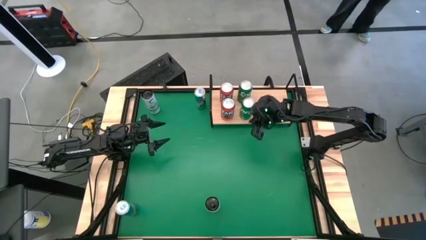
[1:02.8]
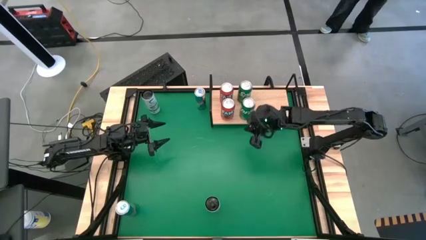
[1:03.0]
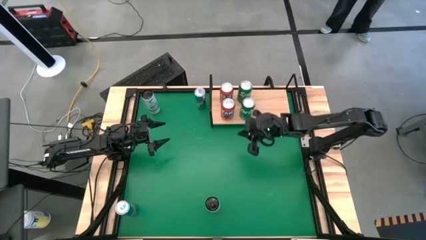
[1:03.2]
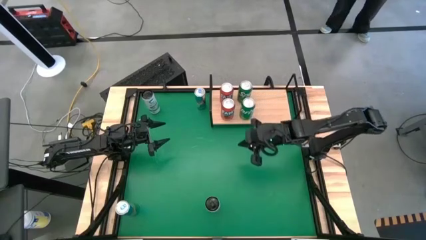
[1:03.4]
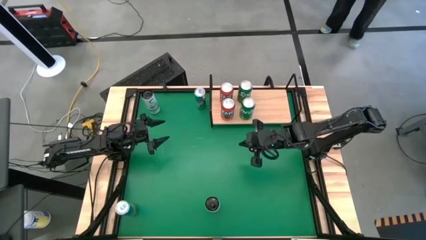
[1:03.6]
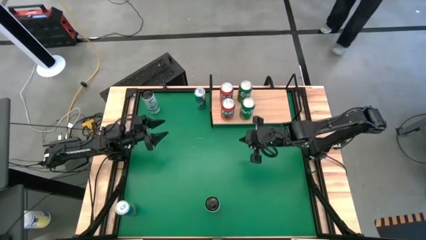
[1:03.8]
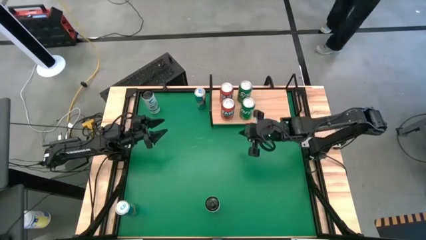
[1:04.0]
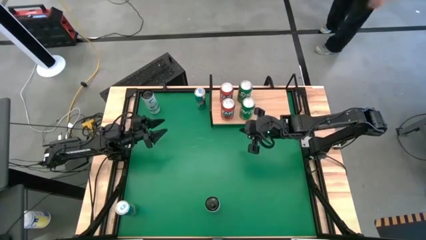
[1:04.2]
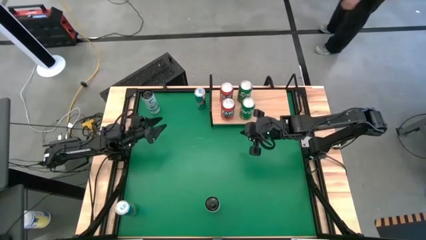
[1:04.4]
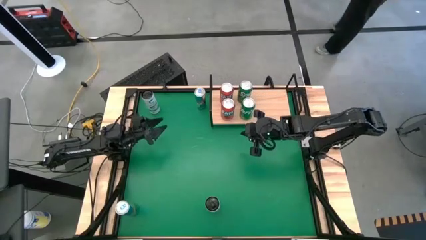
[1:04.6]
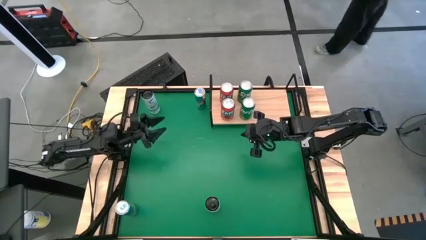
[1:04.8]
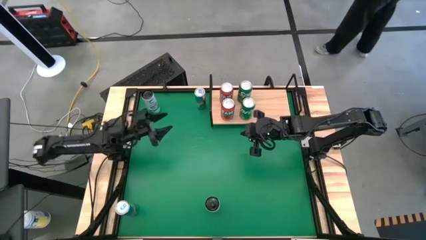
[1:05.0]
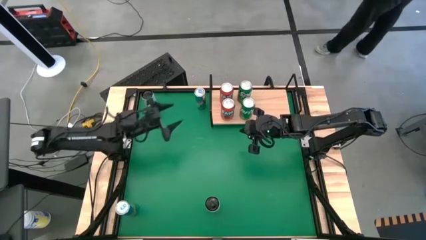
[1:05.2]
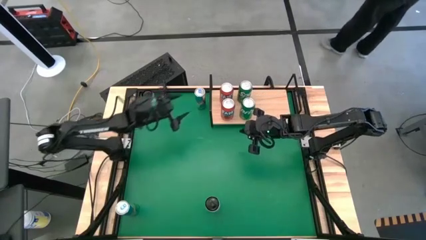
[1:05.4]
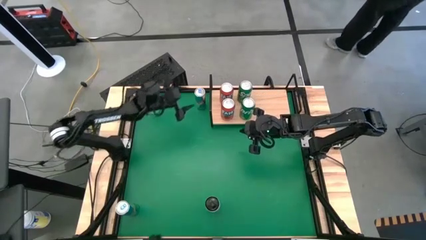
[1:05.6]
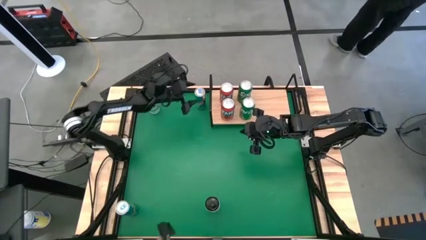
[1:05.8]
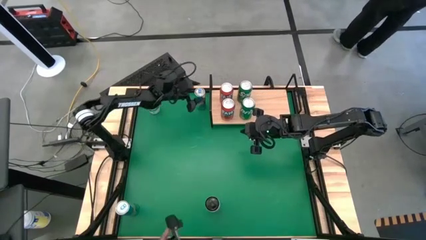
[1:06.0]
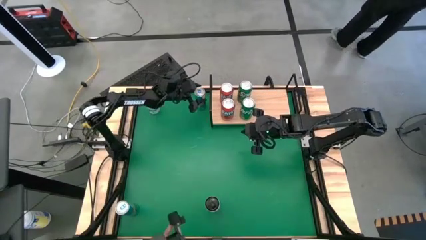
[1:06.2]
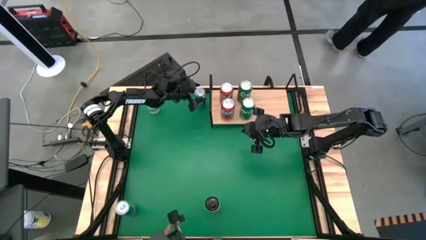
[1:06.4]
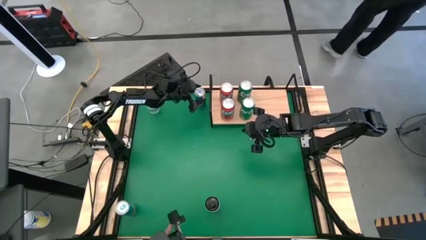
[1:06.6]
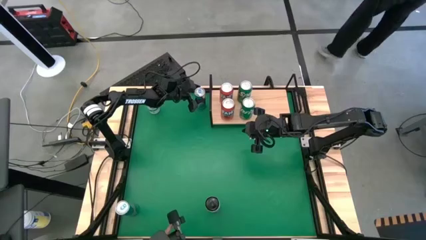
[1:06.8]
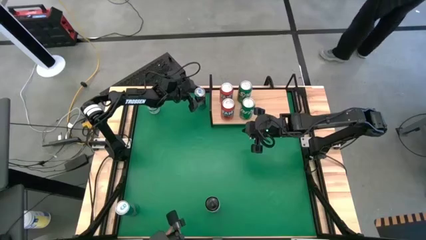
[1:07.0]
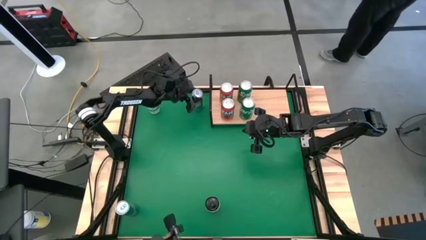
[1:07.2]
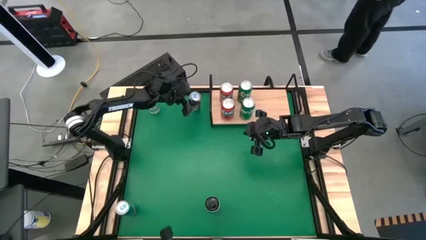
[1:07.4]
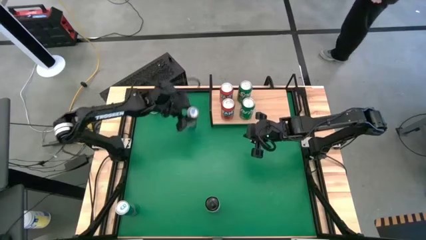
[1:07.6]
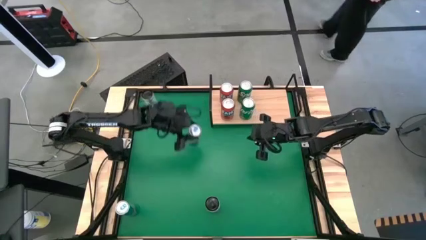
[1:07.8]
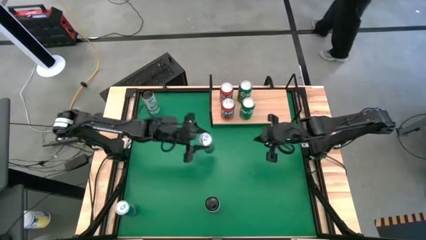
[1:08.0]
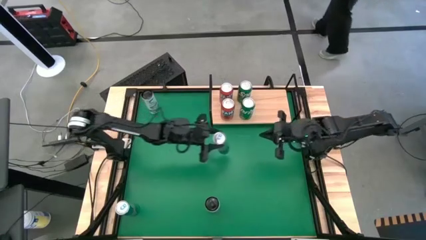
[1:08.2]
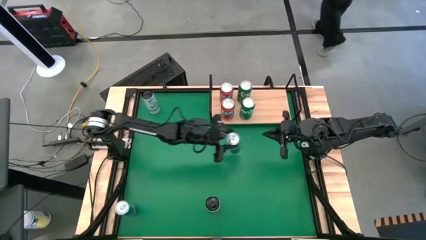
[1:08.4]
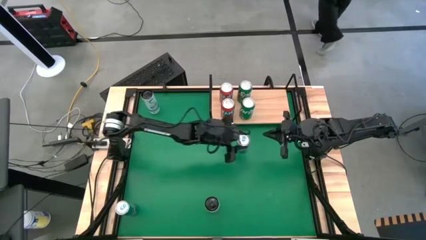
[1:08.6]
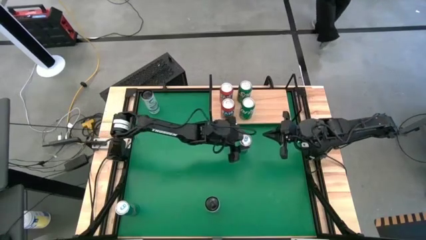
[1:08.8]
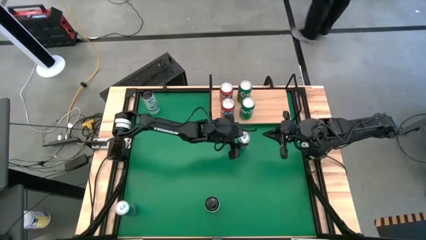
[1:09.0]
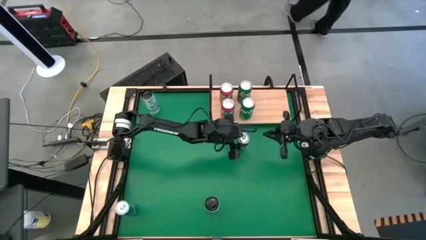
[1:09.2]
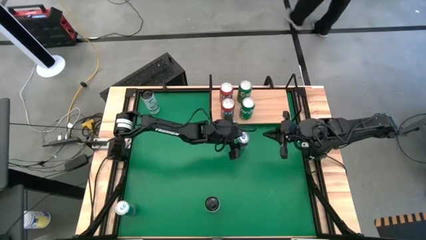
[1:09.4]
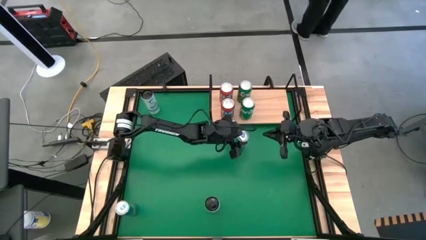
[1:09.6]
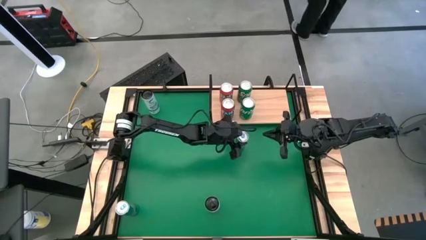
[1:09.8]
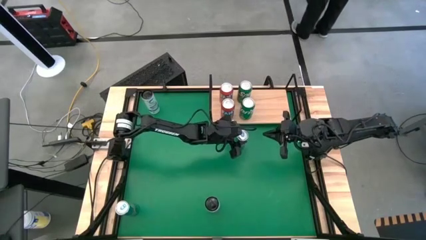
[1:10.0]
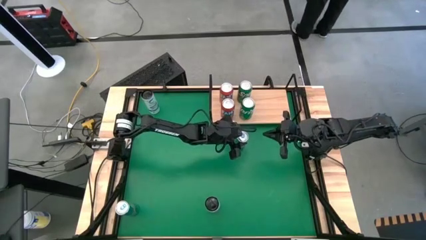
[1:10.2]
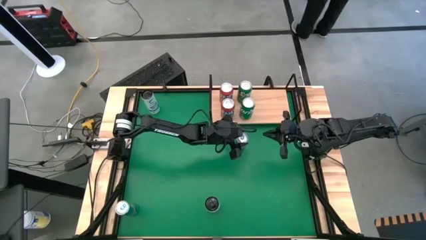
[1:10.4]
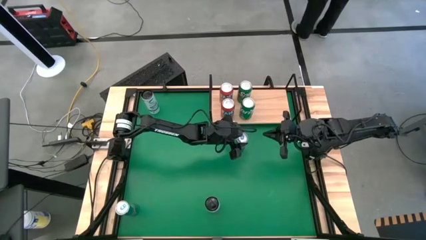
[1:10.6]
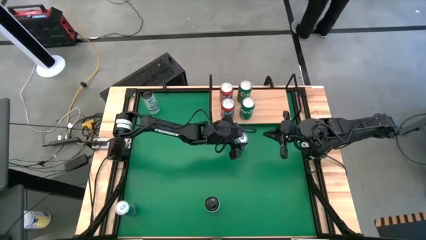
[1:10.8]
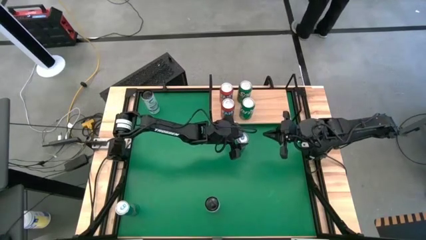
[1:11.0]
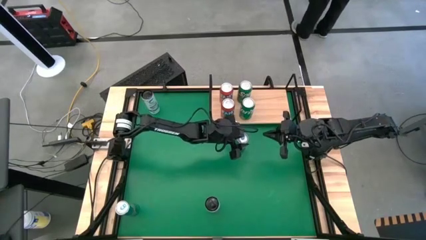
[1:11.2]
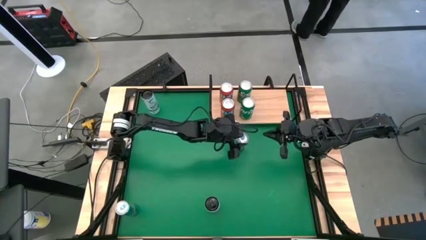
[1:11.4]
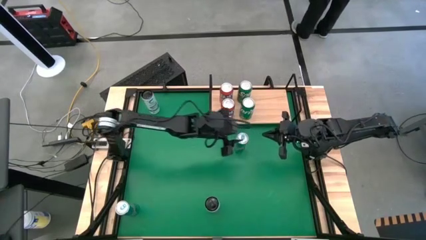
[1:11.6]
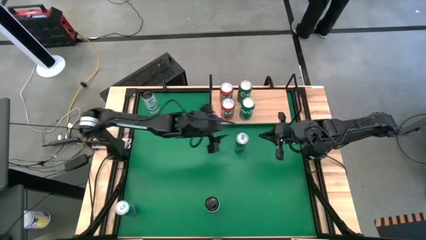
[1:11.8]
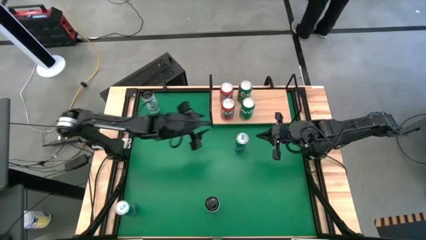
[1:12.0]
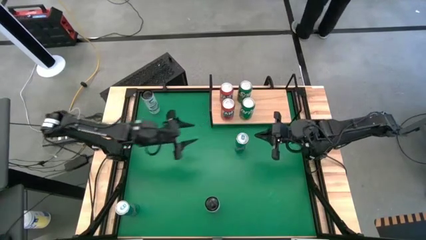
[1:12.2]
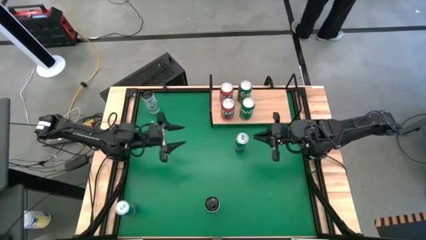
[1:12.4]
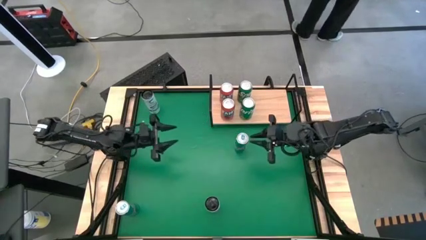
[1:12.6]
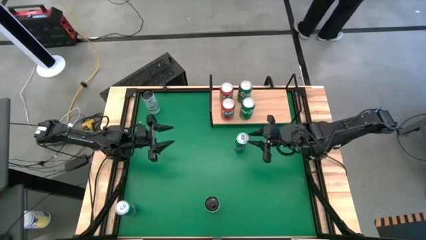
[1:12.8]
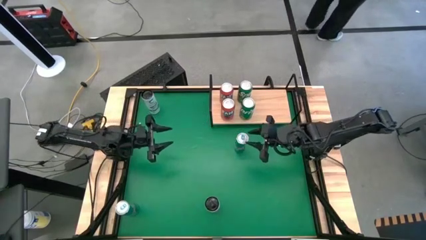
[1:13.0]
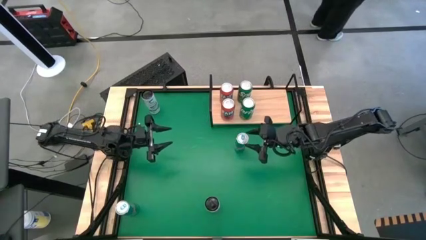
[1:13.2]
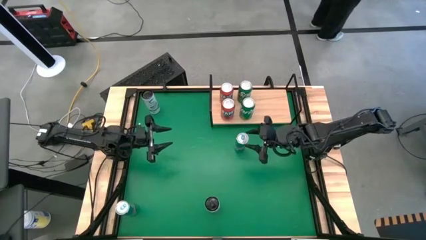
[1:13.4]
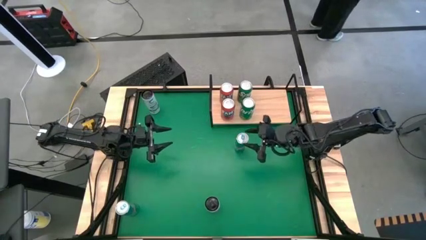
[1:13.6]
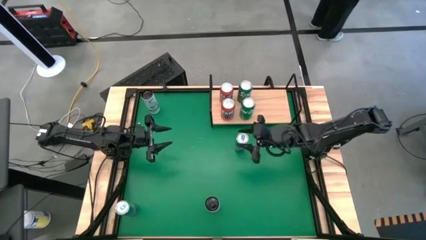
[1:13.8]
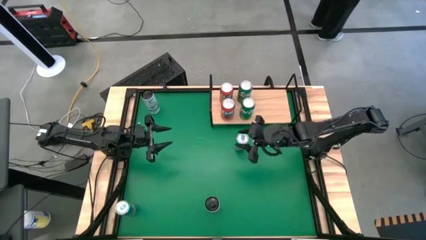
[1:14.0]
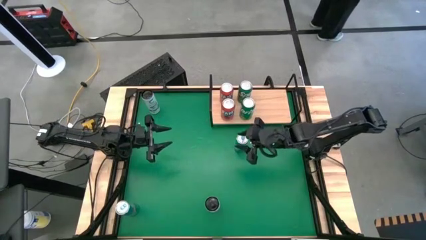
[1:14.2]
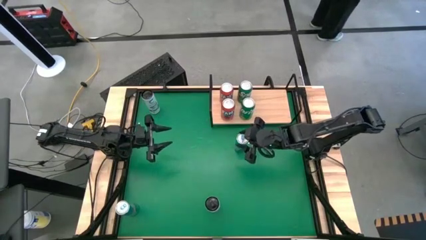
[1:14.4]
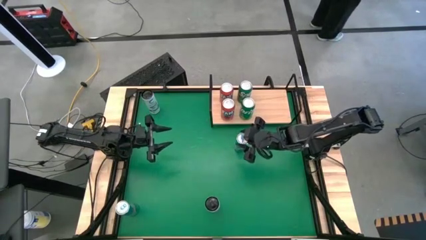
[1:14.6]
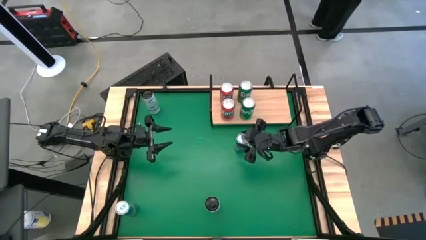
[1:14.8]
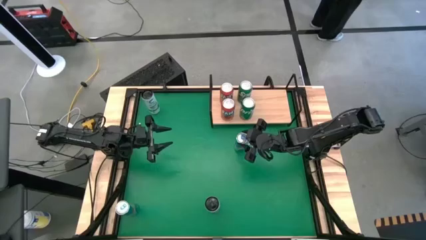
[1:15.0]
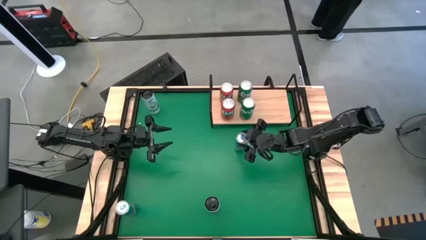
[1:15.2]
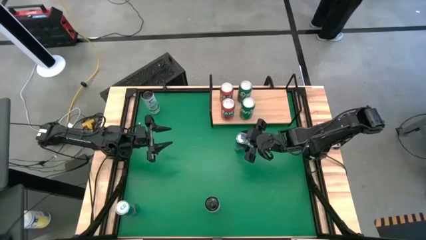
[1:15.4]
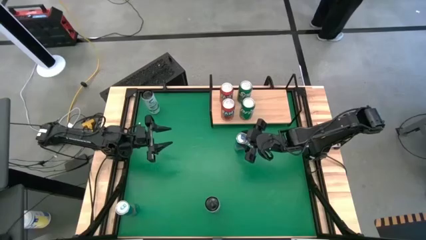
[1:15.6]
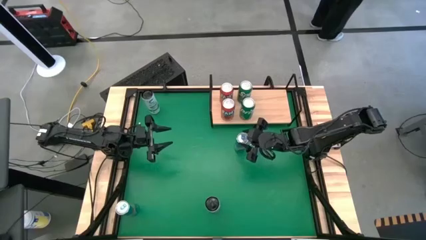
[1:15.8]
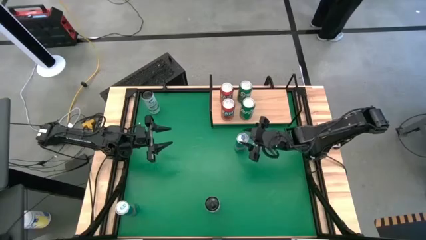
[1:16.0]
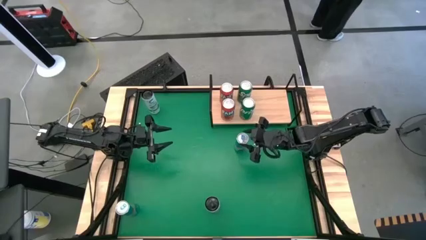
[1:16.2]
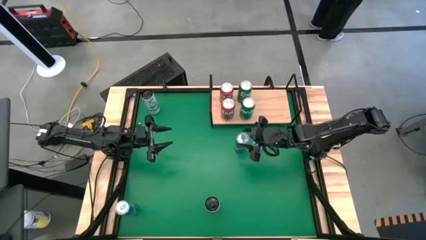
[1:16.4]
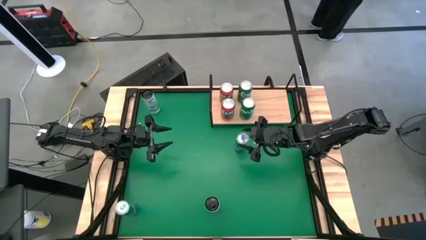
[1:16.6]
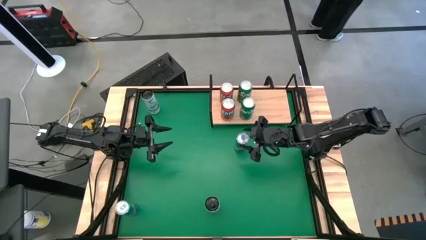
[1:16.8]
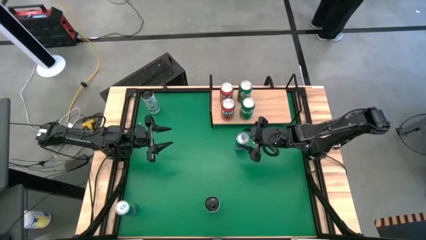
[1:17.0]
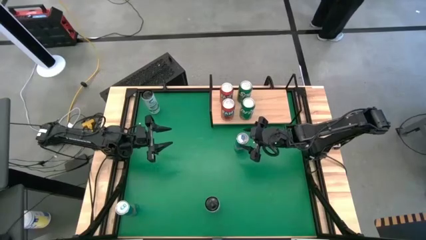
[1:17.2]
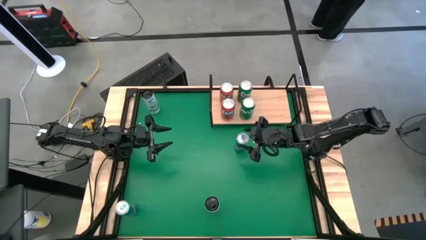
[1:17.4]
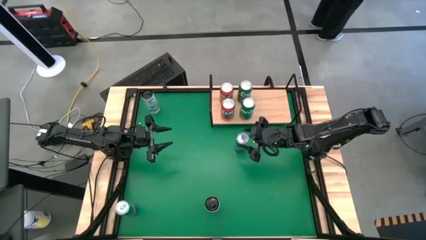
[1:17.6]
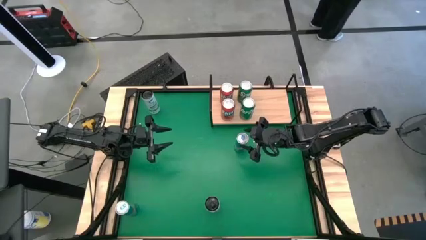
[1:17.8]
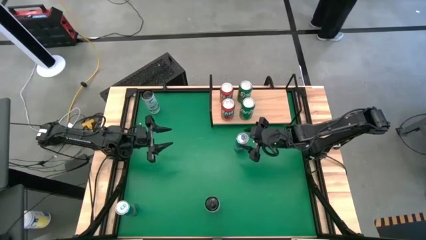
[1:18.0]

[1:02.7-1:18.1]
Task: Place canned beverage on shelf
Put the top blue soda can on the shelf
